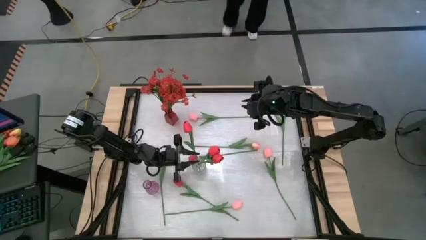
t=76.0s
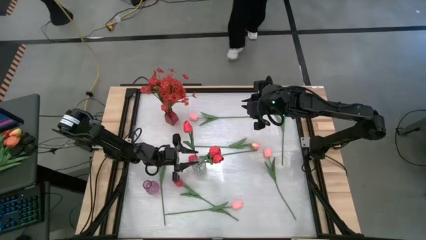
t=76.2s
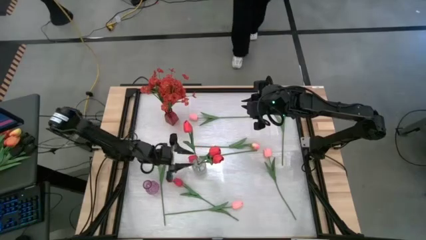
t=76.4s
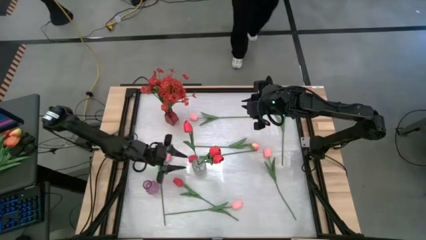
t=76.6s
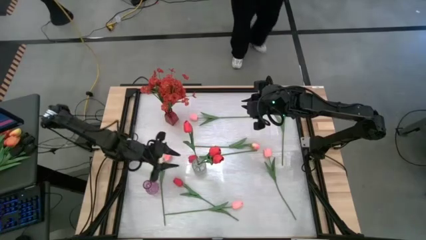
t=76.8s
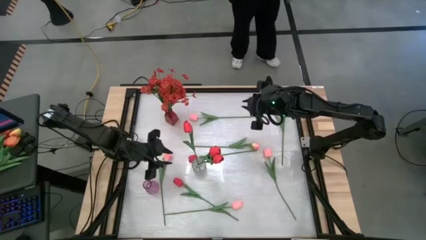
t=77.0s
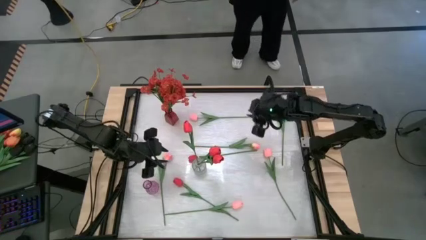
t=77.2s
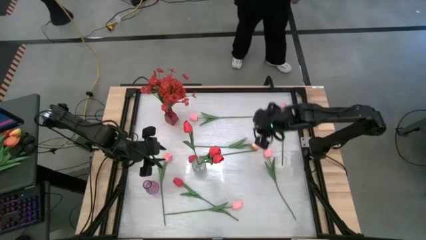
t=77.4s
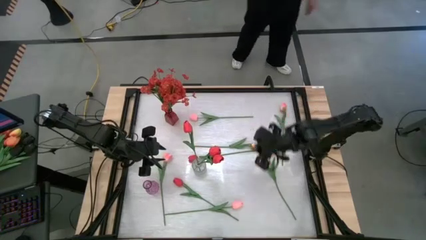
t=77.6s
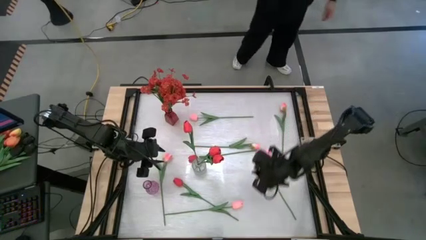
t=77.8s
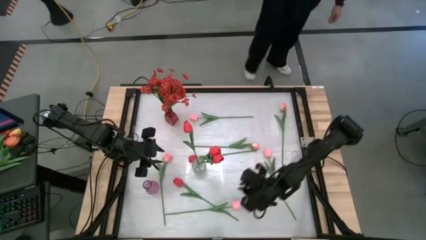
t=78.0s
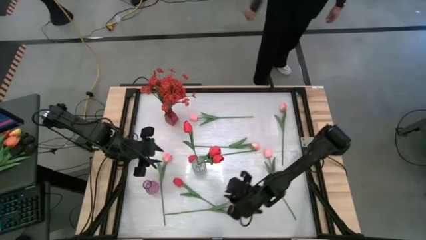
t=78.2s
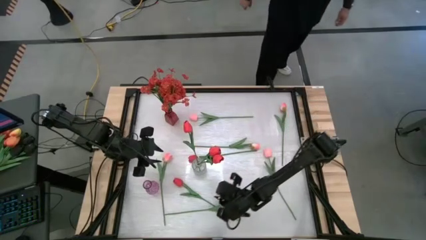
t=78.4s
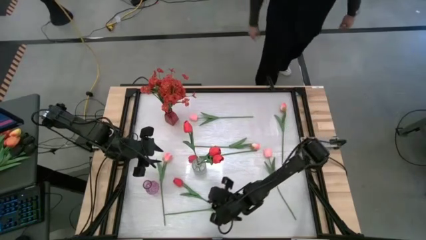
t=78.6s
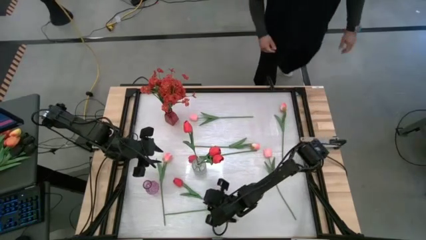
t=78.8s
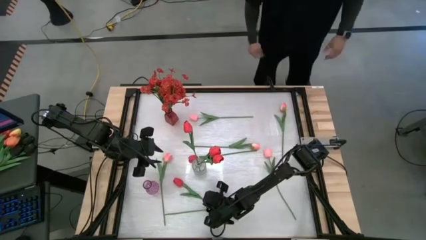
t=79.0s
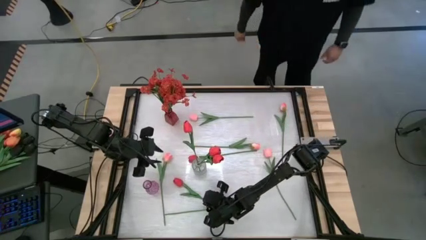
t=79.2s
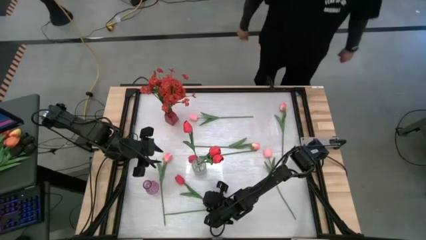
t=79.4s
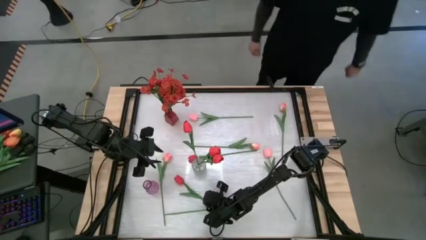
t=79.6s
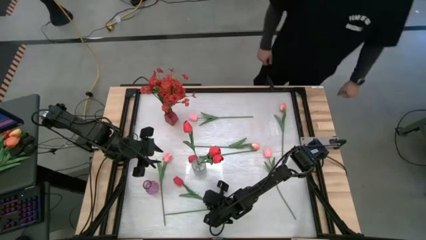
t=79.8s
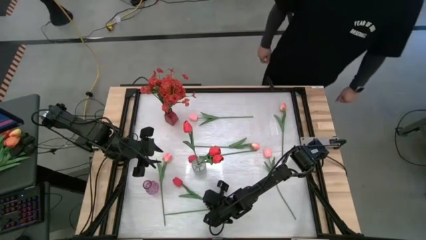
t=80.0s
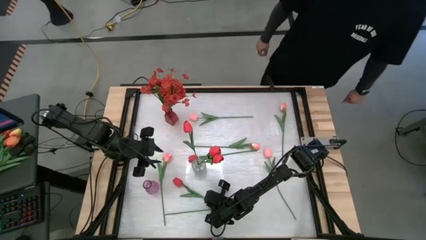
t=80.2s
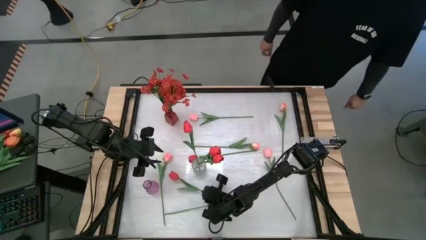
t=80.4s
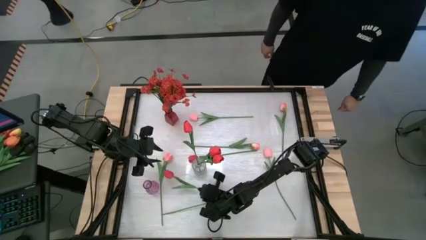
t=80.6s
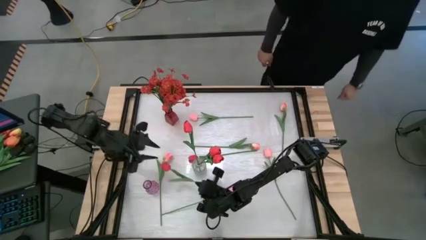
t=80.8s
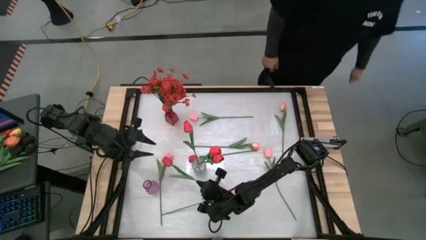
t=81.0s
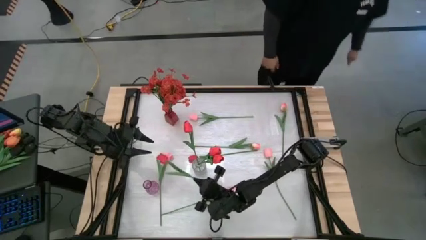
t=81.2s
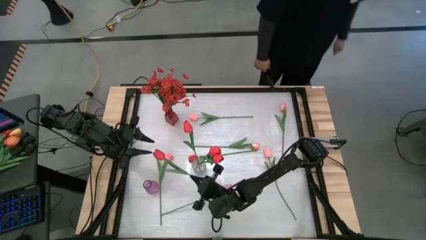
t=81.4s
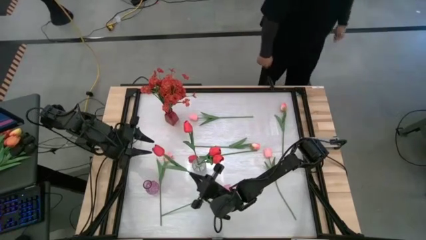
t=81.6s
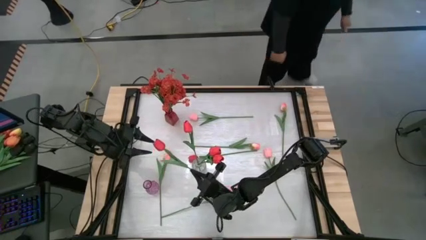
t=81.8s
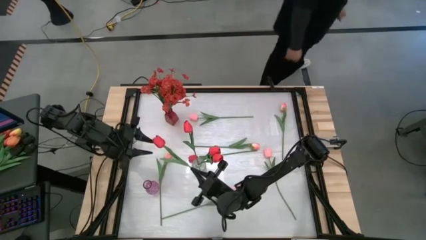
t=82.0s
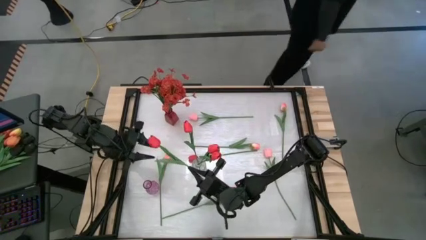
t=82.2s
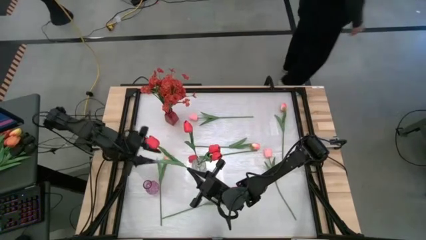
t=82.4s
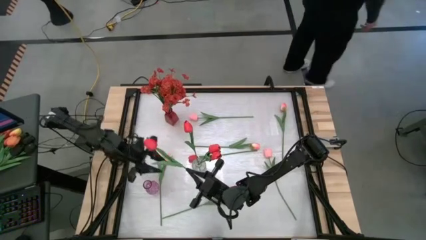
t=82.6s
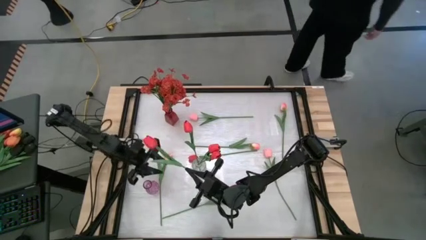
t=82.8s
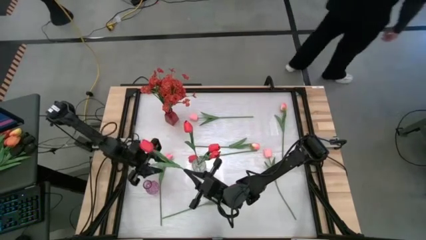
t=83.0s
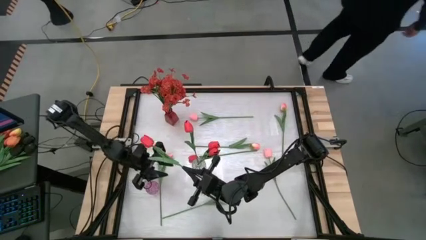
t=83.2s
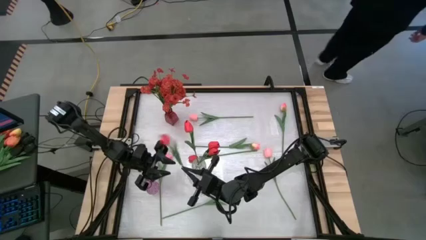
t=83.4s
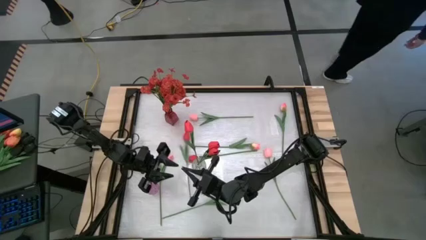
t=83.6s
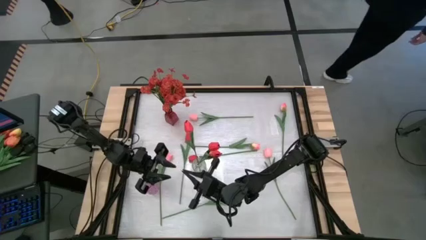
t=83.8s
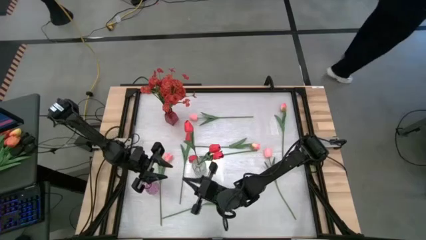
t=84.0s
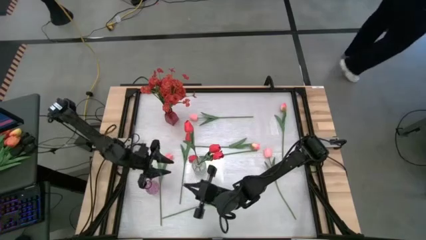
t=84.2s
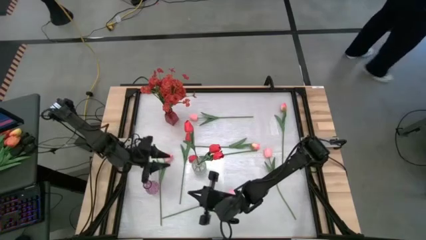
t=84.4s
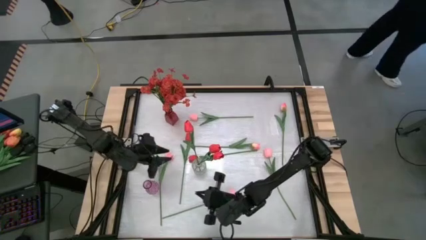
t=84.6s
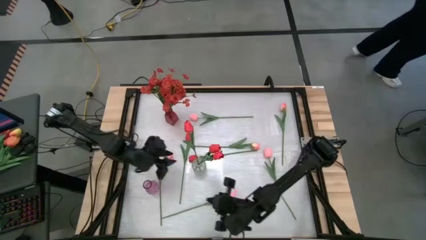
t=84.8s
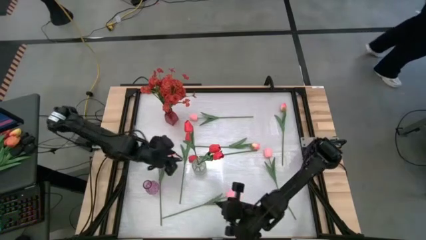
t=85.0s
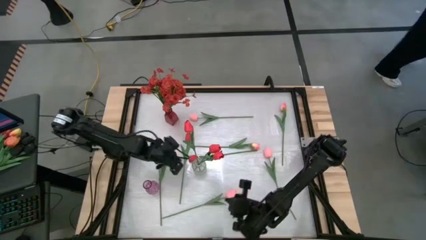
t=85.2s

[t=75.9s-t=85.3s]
Task: Sort flowers into vase by color
Put the red flower into the transparent vase

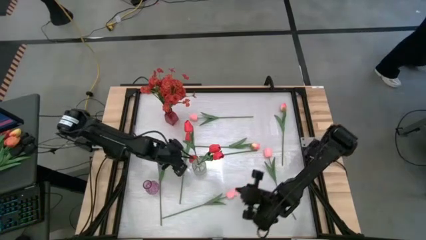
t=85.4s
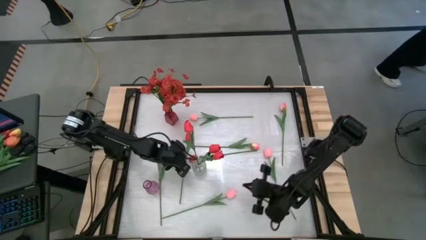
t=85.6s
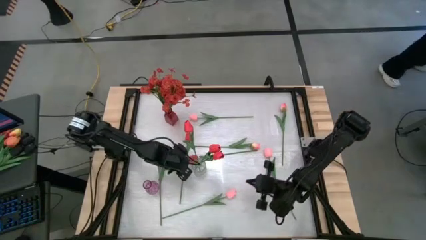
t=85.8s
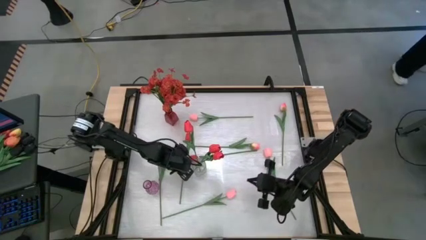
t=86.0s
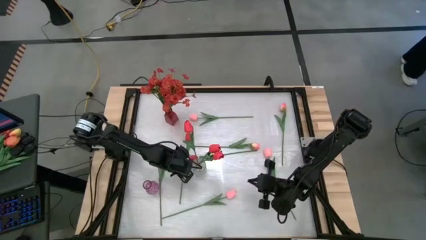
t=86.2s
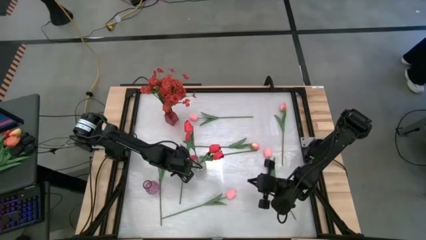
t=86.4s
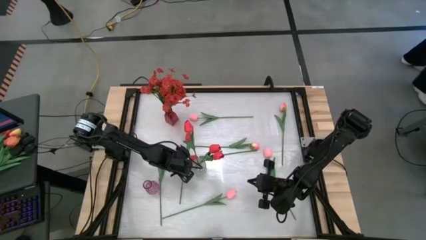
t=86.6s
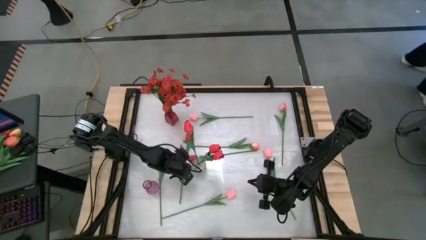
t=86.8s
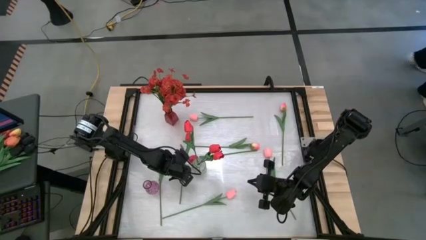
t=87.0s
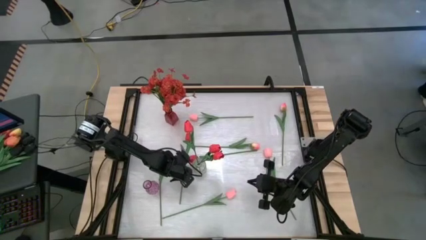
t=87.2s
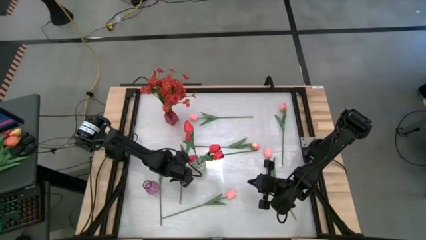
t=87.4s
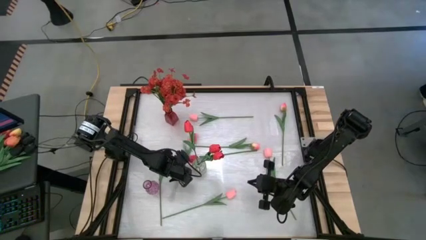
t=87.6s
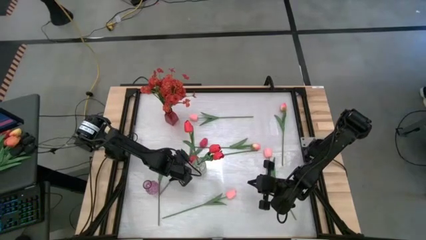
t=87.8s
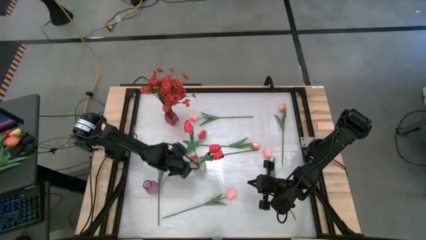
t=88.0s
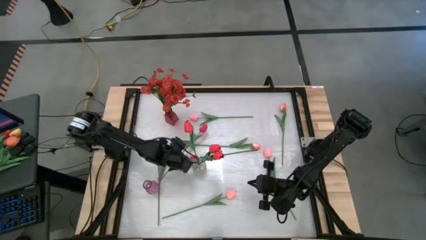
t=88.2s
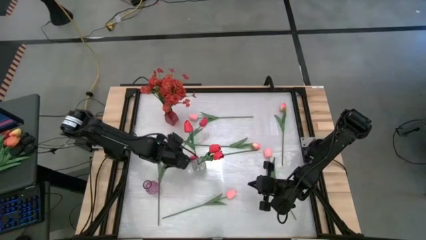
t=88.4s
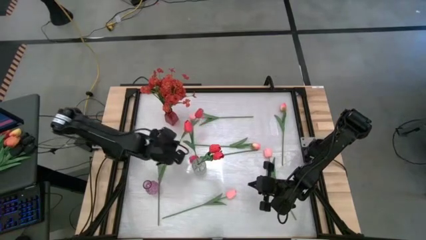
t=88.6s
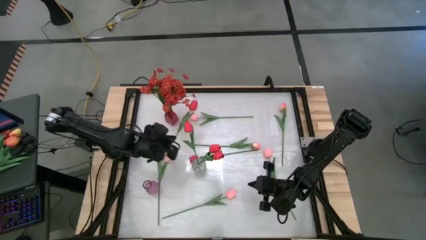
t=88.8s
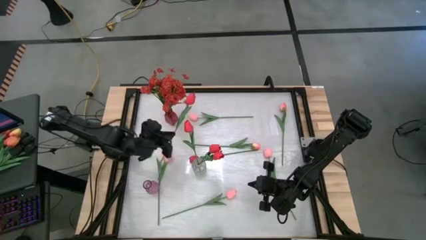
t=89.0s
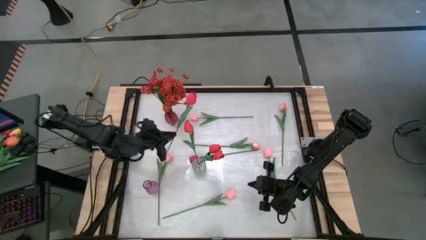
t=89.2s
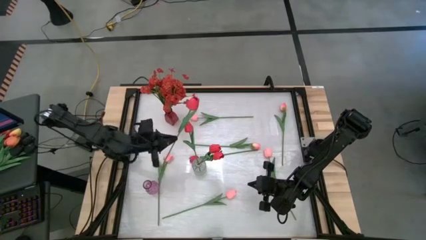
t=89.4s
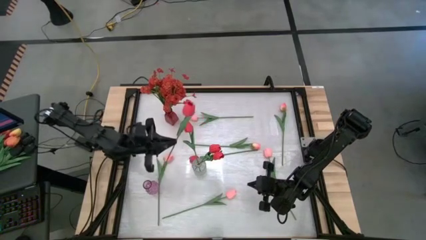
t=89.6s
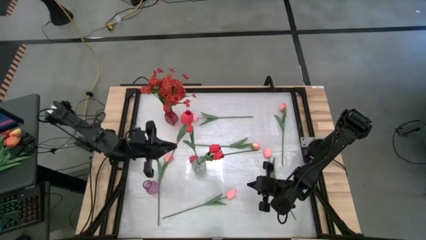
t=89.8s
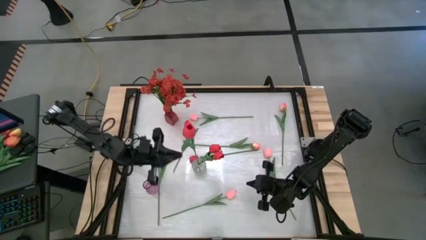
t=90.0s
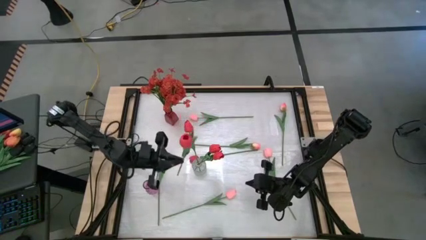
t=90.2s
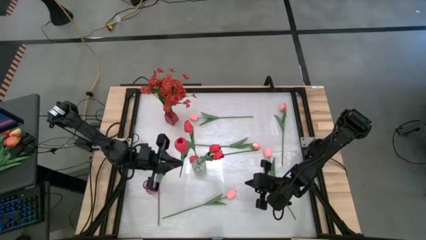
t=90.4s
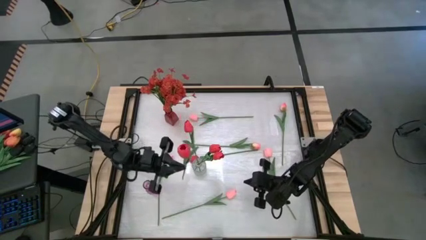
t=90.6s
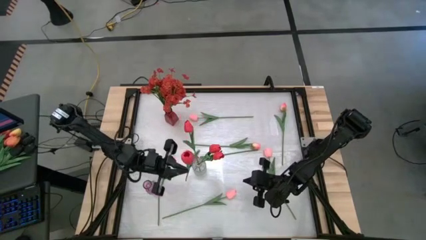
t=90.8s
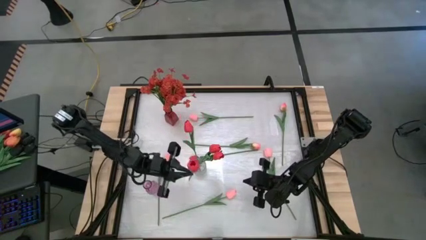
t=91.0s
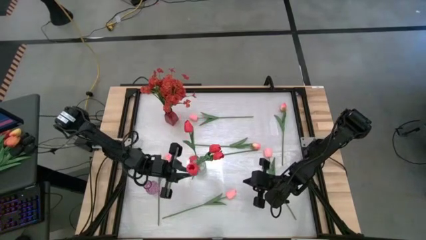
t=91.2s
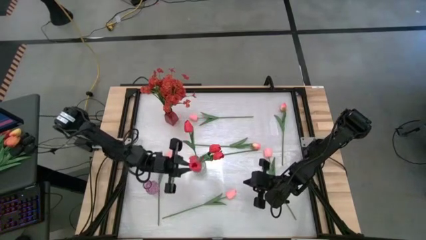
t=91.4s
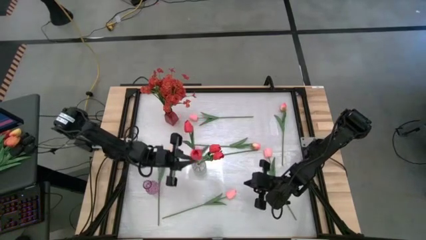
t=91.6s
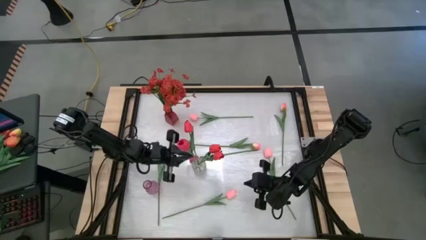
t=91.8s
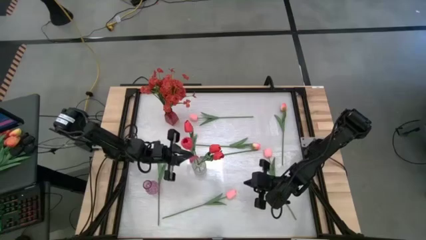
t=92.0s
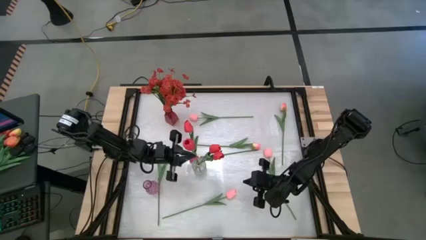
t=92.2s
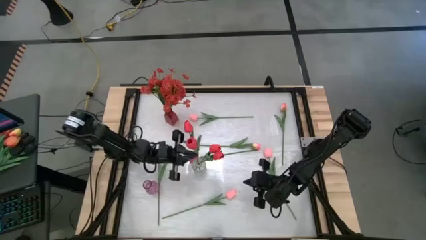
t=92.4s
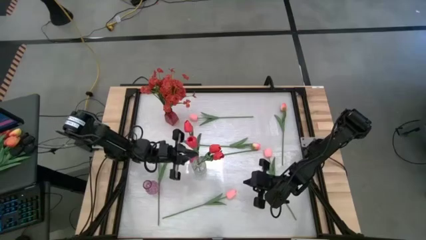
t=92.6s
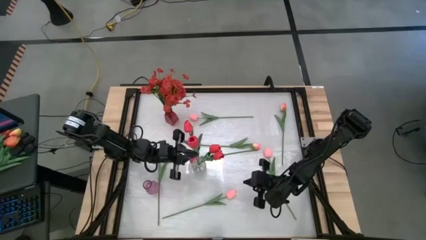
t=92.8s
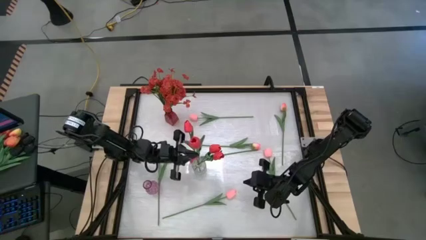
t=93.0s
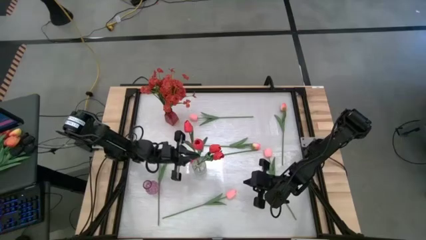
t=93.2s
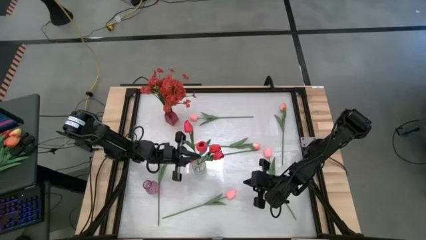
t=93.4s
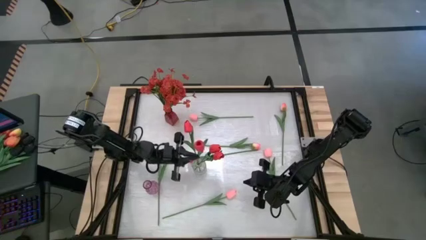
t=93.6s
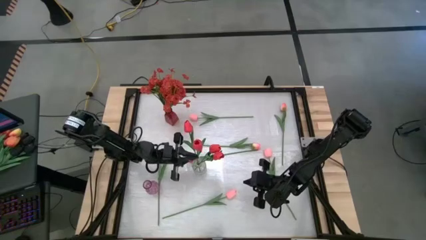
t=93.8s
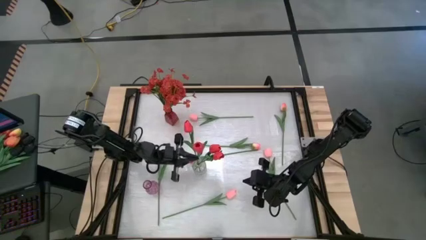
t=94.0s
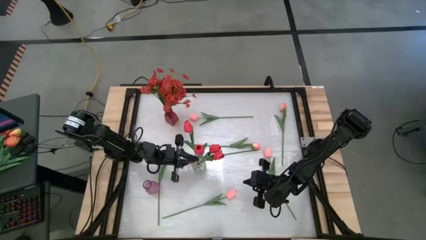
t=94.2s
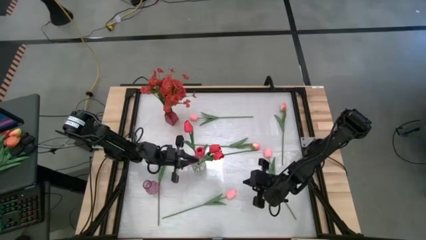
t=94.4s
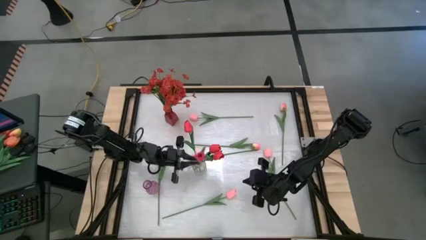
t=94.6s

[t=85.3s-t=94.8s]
Put the red flower into the transparent vase
